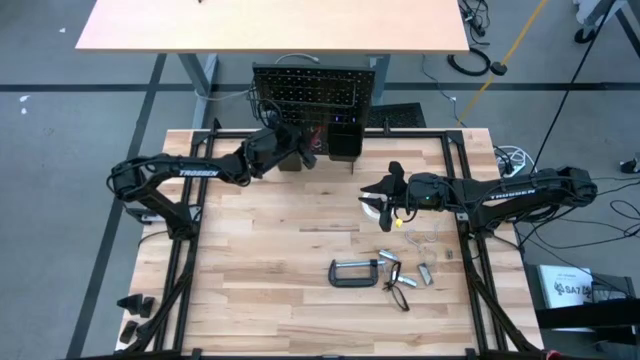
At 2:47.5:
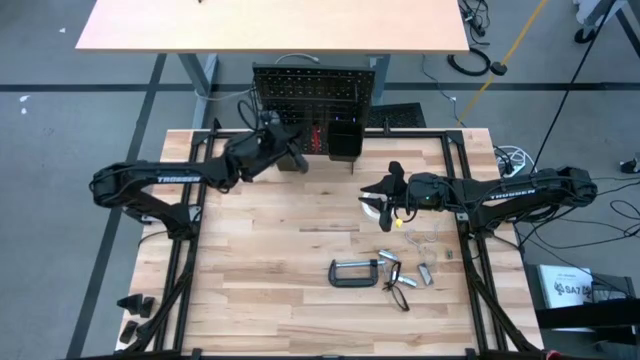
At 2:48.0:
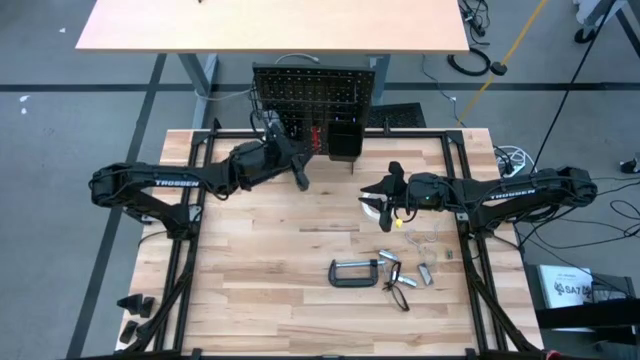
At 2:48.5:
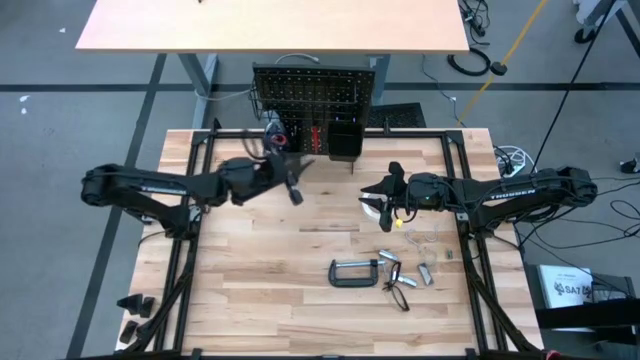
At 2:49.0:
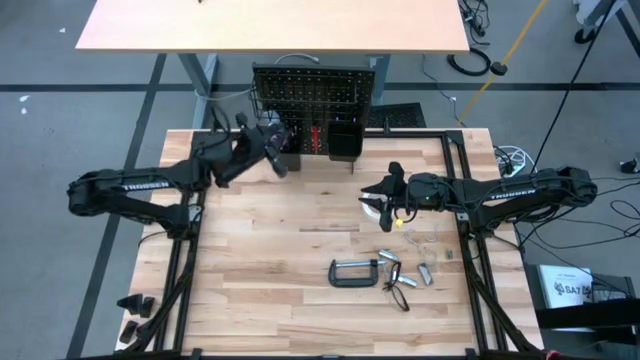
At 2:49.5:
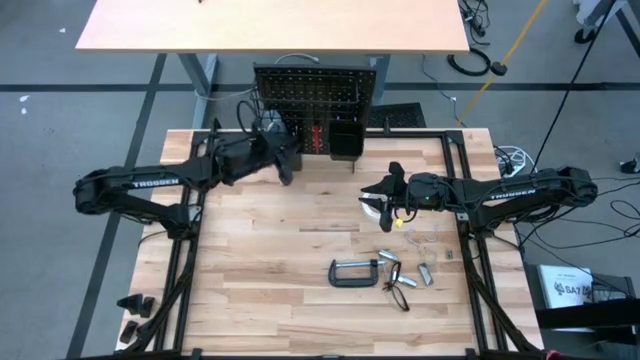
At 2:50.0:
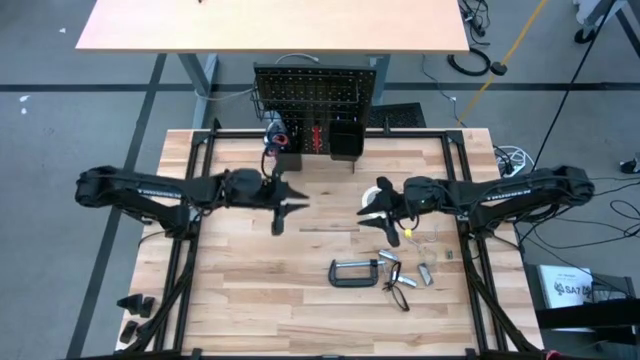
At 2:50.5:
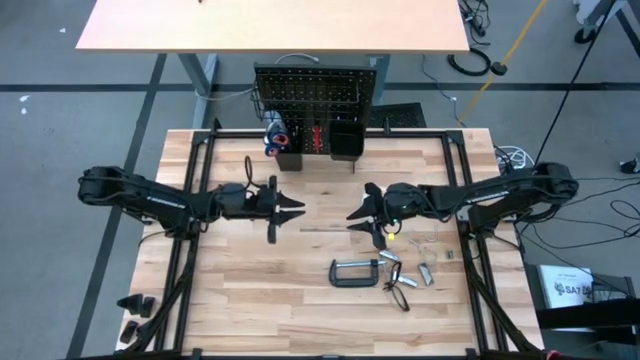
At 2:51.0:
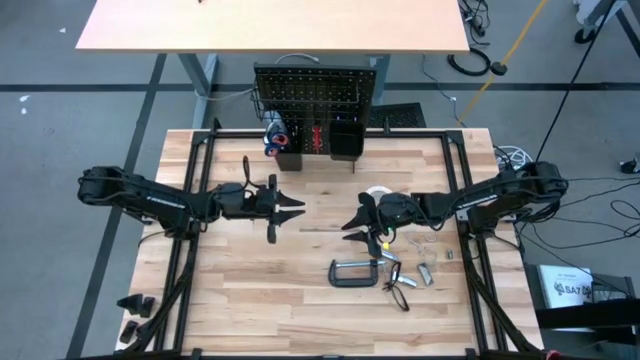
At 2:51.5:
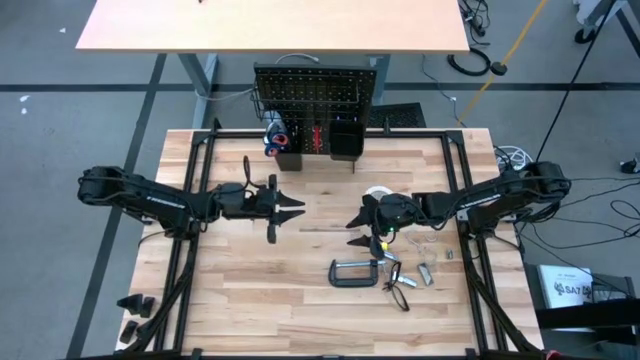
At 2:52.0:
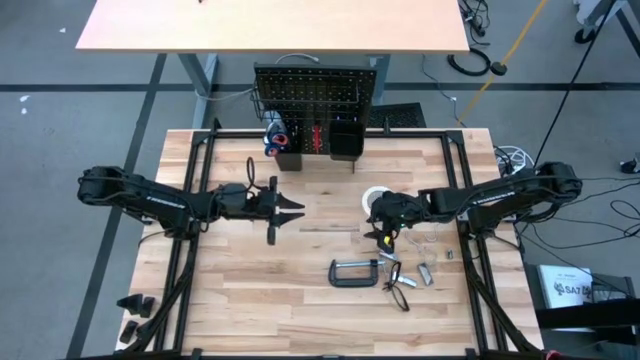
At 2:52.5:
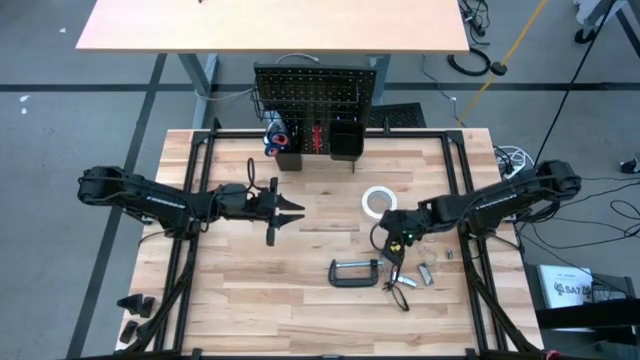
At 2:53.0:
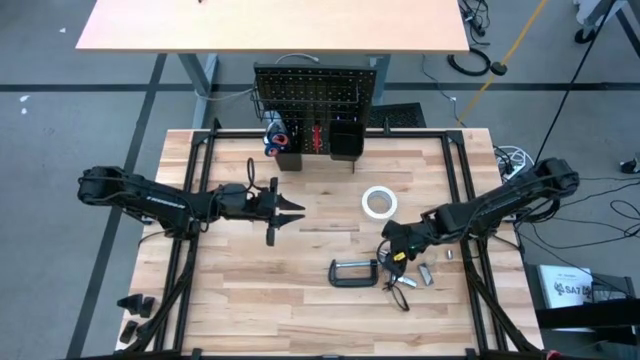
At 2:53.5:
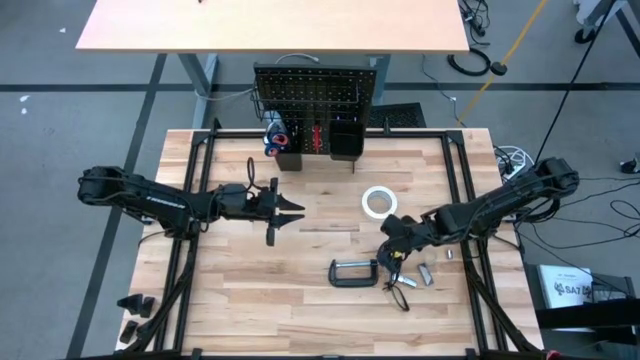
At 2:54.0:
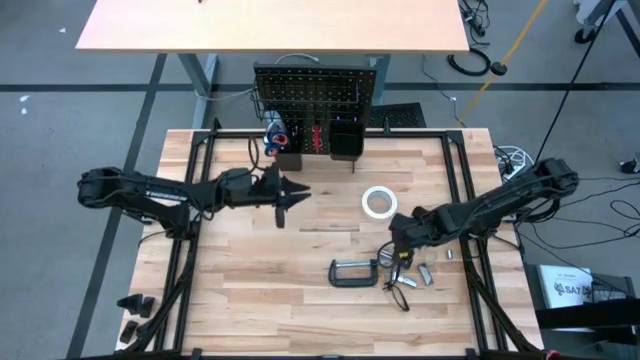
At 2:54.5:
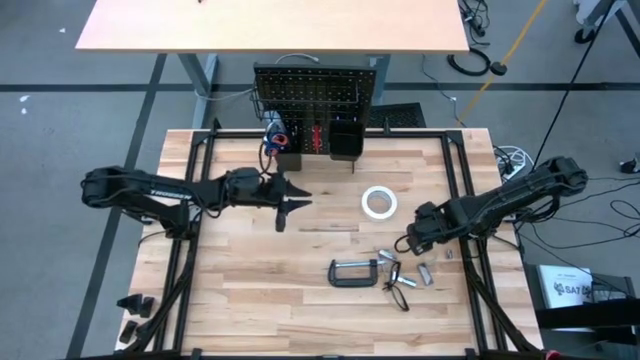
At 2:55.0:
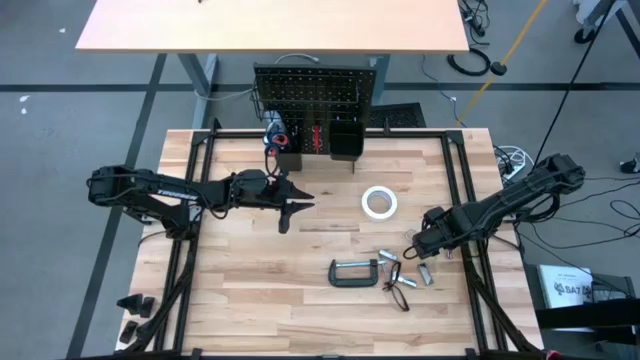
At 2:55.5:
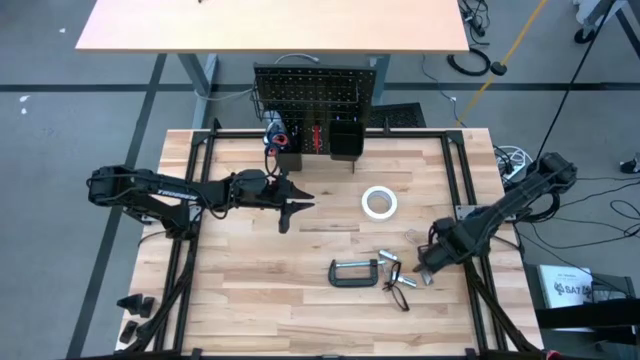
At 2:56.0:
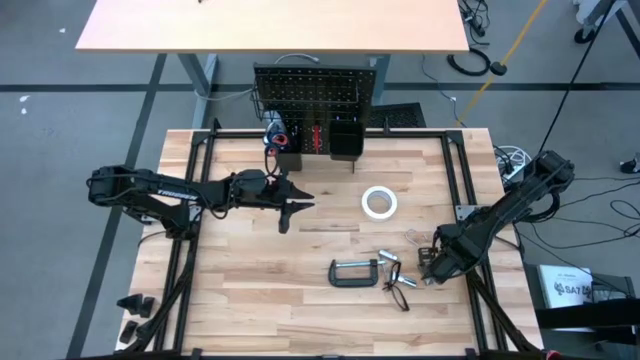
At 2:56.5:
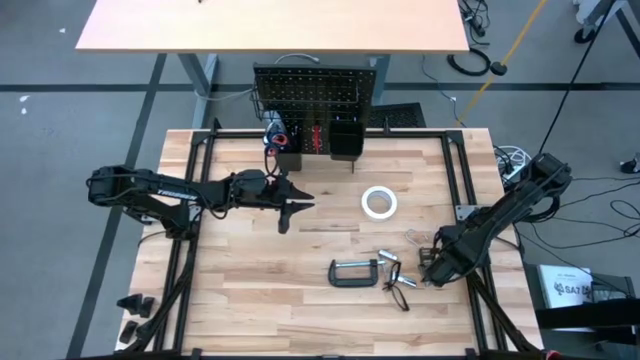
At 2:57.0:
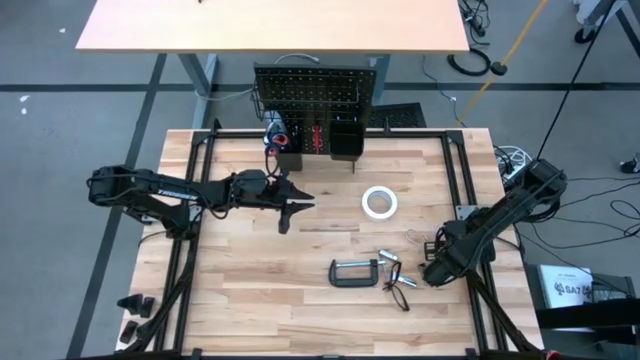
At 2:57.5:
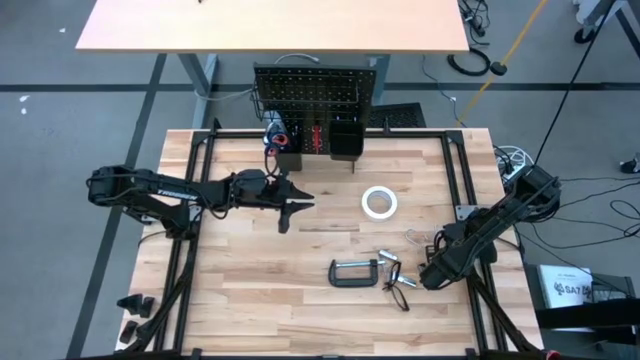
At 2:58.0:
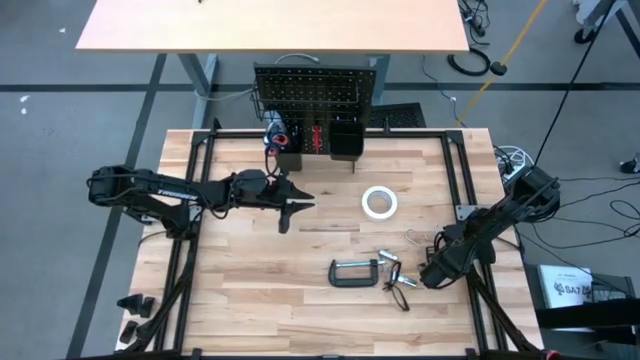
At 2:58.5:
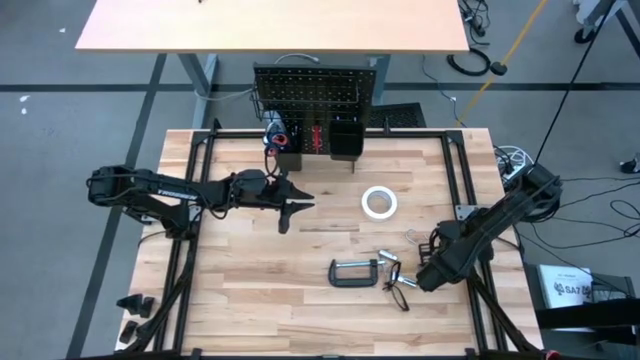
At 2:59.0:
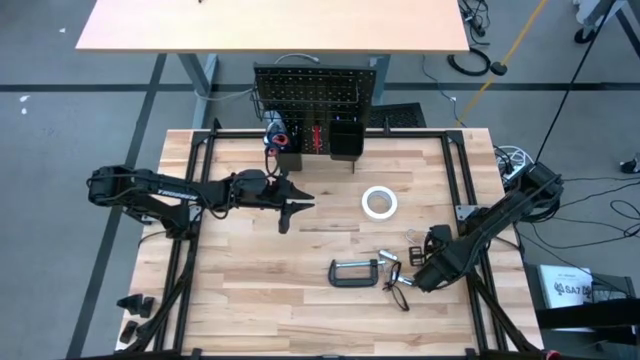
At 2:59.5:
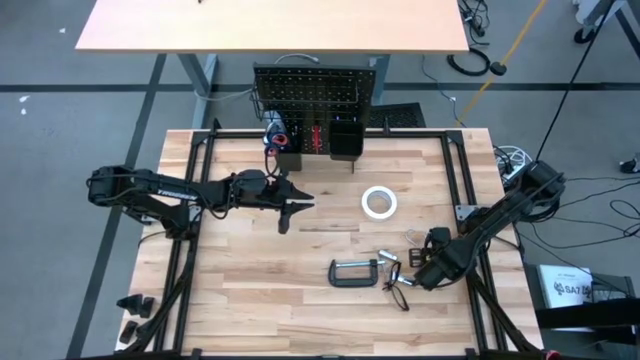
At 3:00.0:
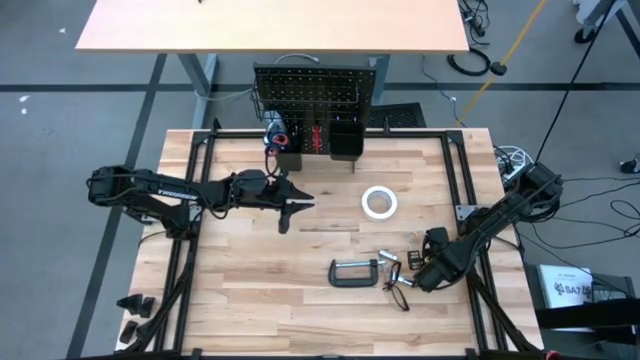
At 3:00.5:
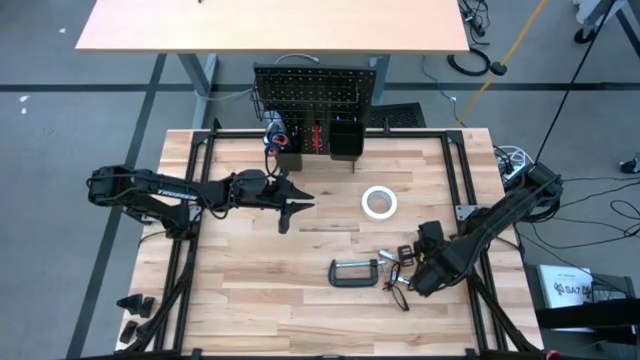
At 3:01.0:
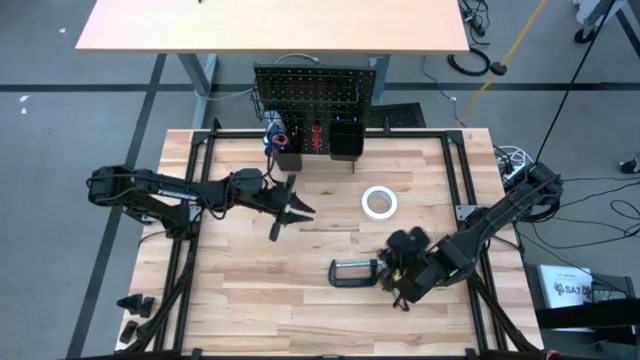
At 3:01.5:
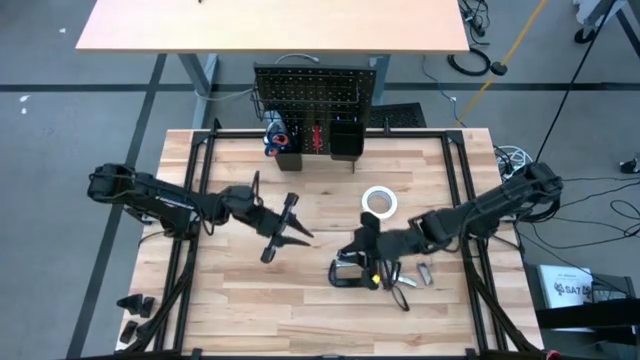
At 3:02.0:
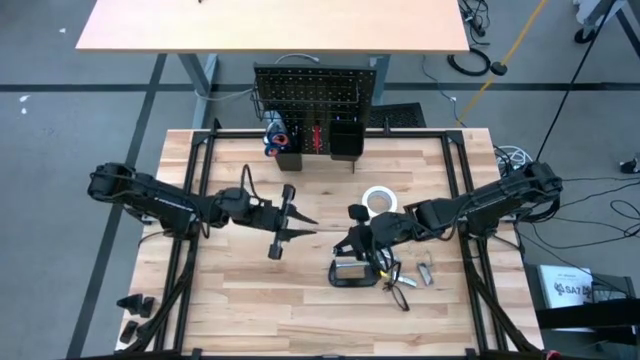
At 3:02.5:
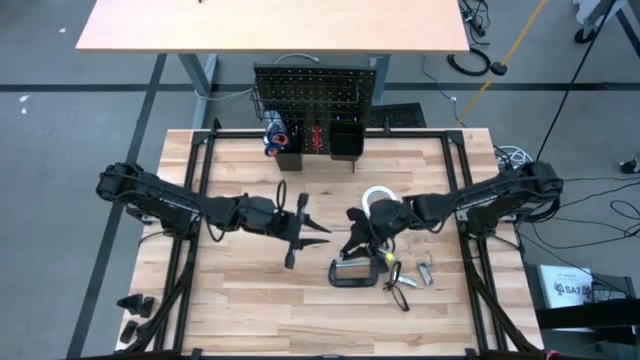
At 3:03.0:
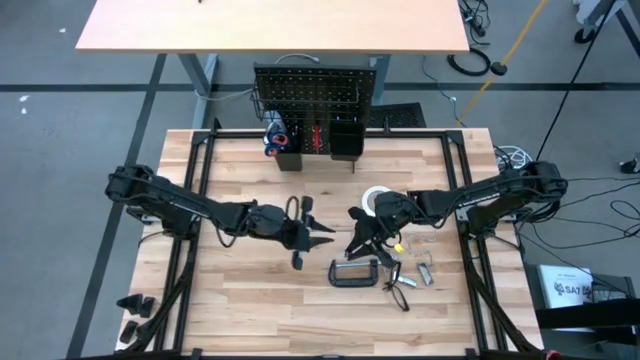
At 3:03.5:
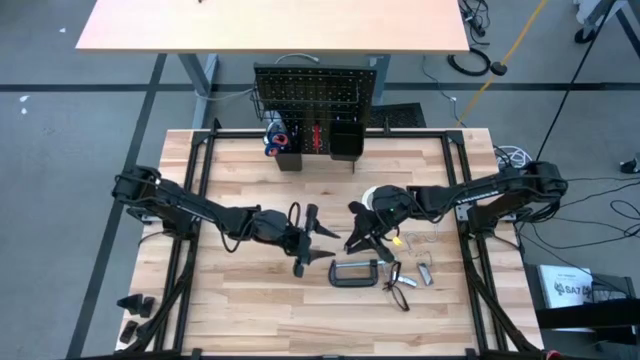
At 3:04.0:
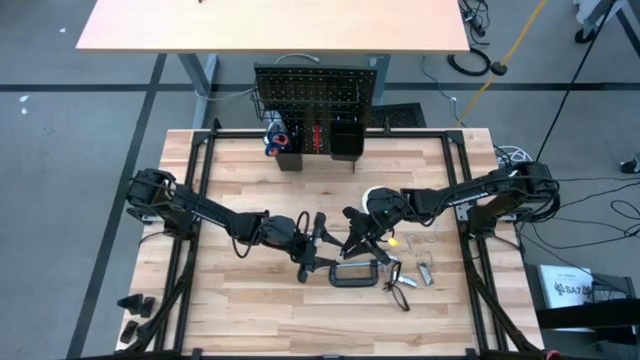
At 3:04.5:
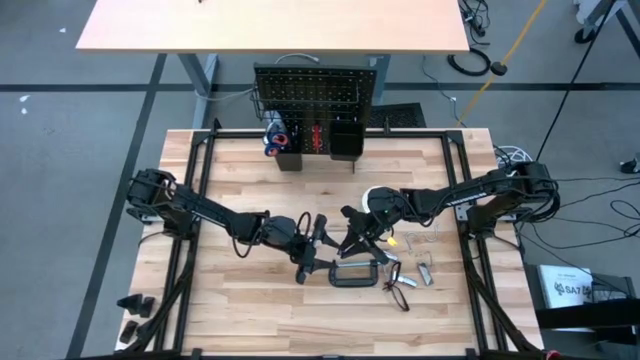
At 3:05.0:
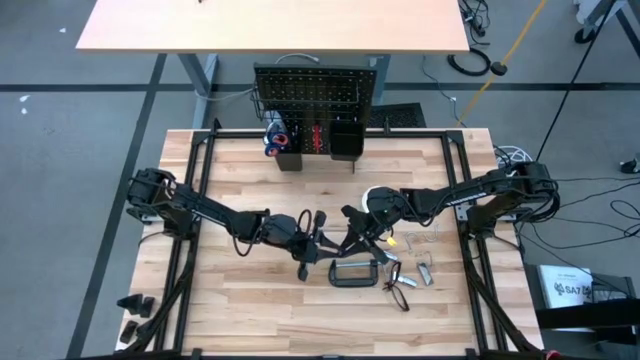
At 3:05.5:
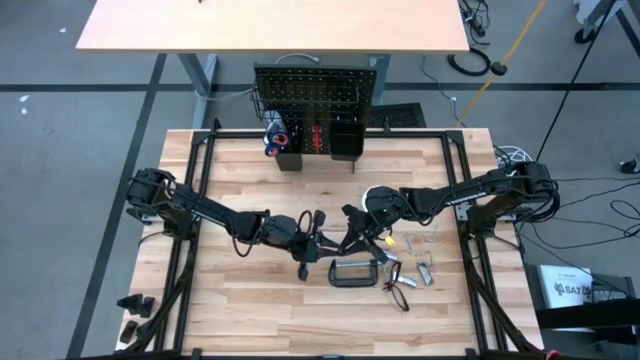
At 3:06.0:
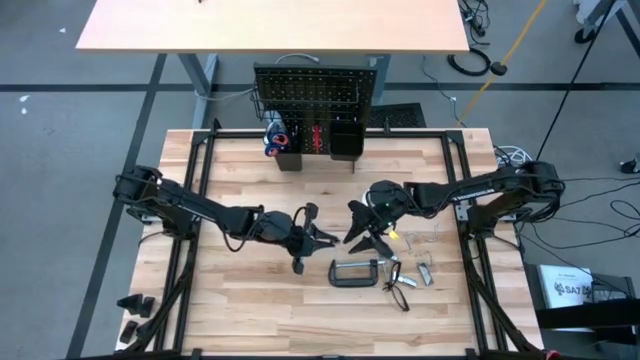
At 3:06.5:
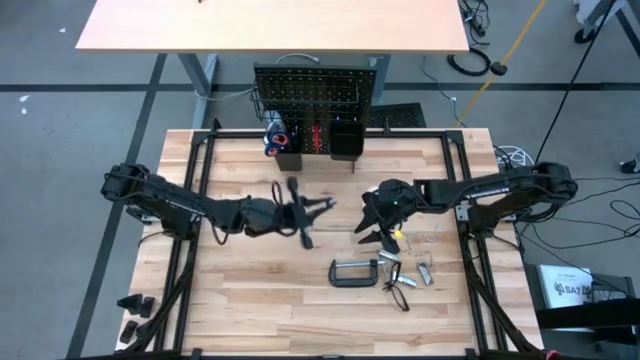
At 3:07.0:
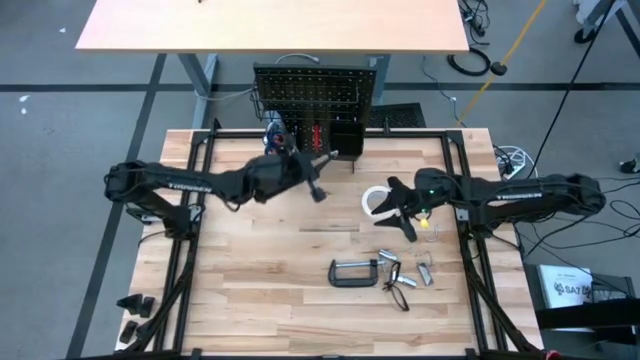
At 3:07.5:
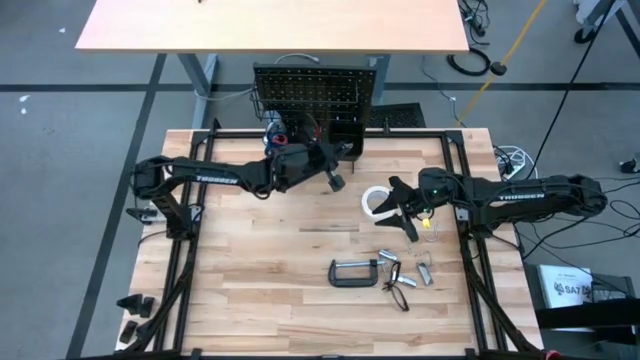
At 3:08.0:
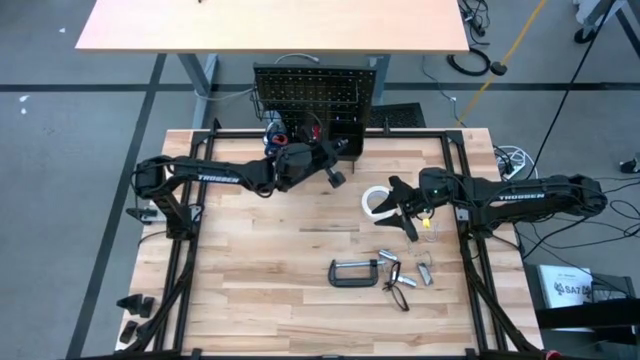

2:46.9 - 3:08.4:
Task: Hang tools onto peg board
Put the socket on the right lower deck of the pegboard
